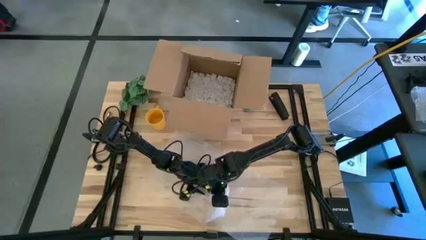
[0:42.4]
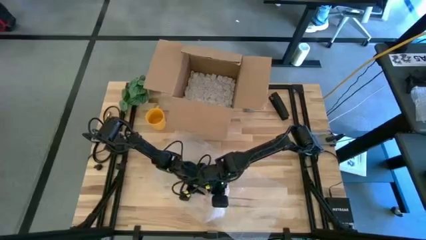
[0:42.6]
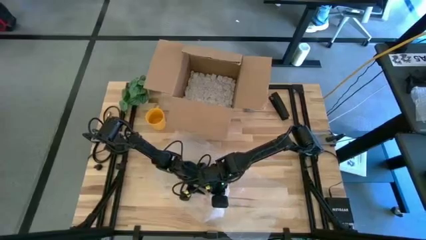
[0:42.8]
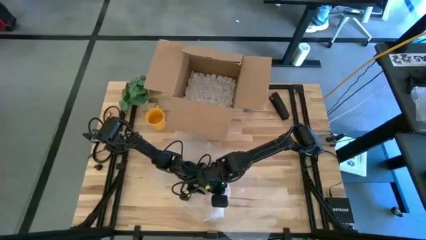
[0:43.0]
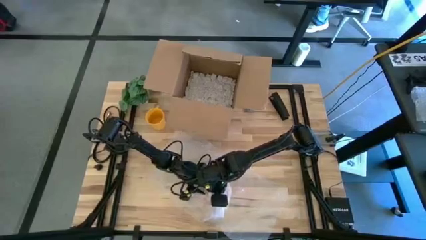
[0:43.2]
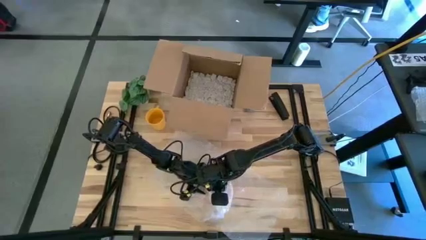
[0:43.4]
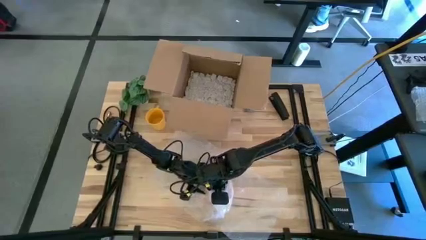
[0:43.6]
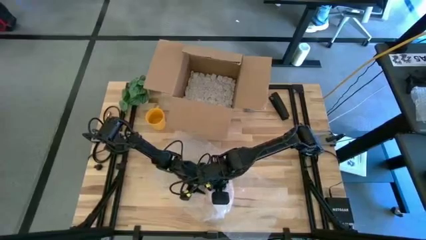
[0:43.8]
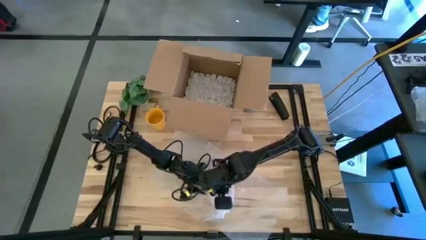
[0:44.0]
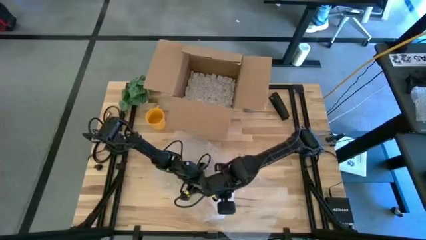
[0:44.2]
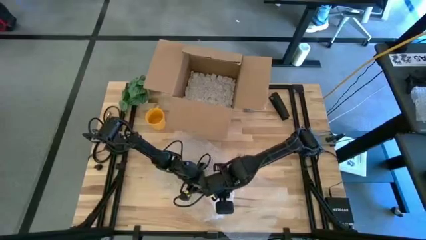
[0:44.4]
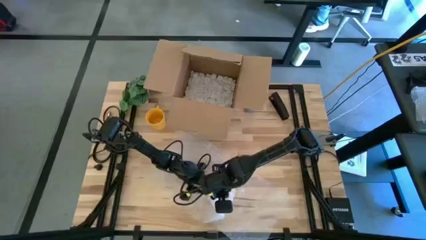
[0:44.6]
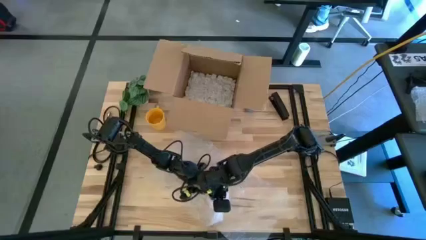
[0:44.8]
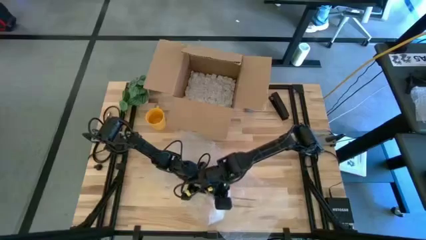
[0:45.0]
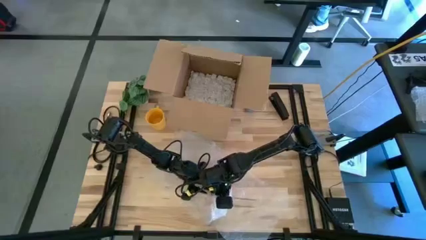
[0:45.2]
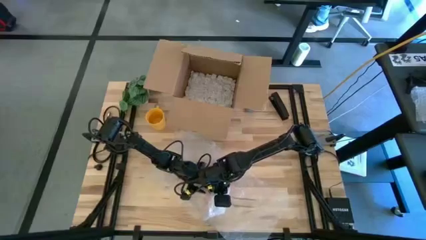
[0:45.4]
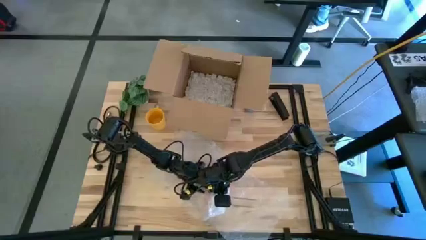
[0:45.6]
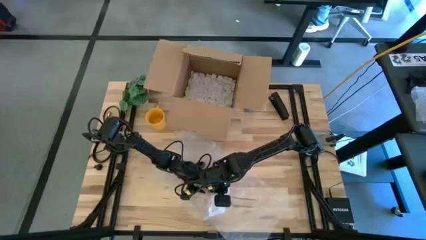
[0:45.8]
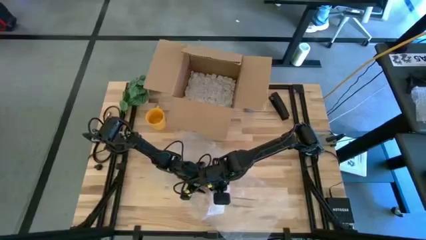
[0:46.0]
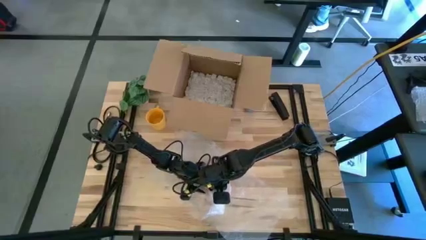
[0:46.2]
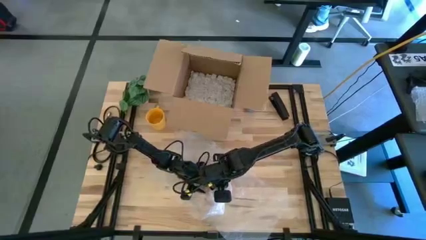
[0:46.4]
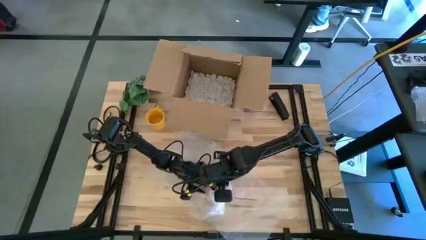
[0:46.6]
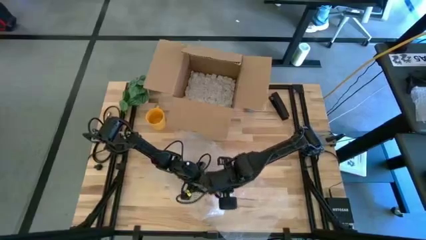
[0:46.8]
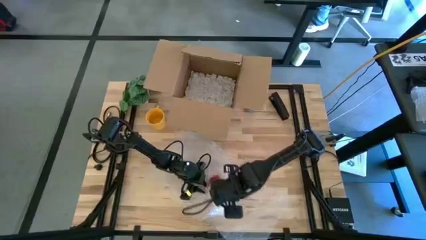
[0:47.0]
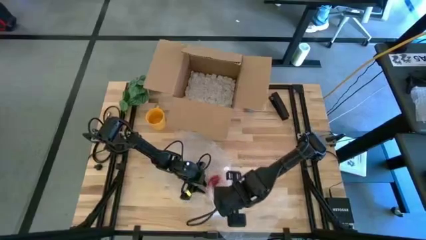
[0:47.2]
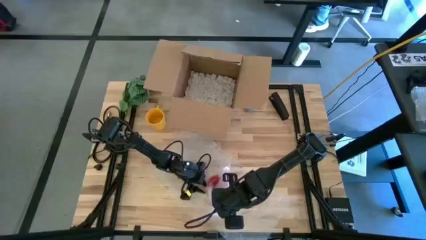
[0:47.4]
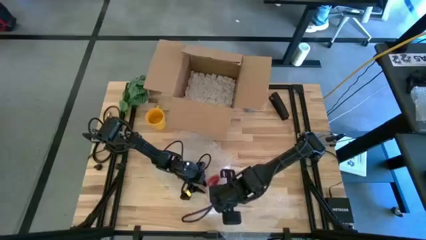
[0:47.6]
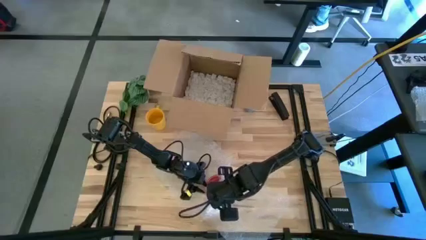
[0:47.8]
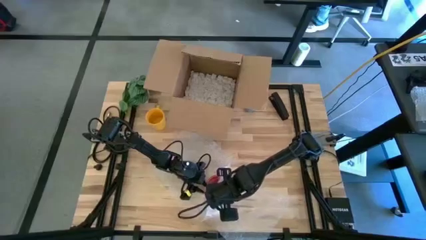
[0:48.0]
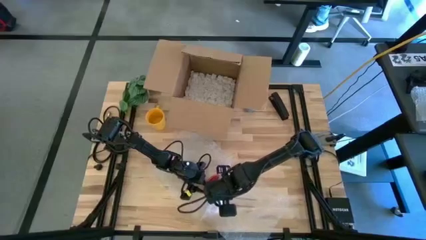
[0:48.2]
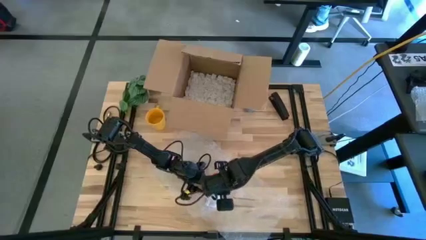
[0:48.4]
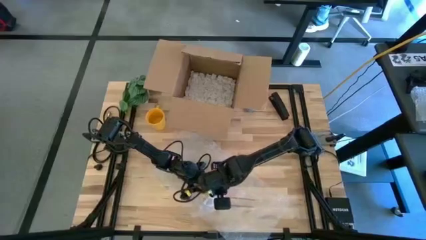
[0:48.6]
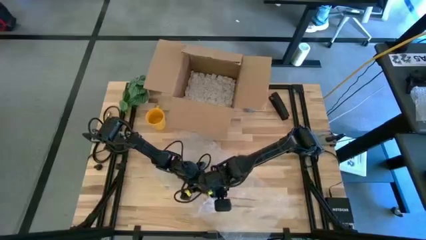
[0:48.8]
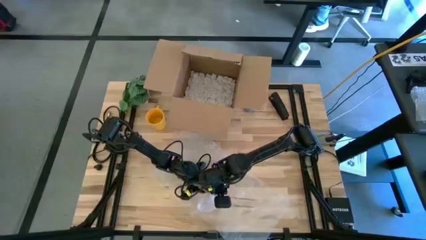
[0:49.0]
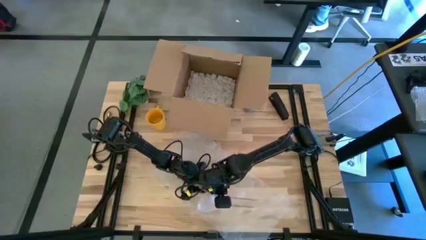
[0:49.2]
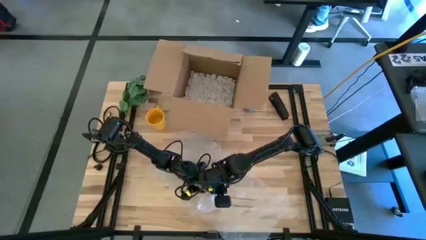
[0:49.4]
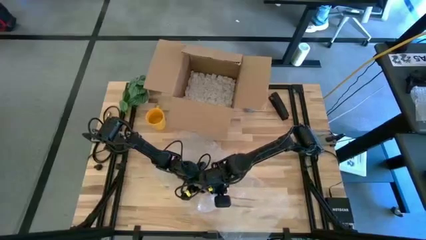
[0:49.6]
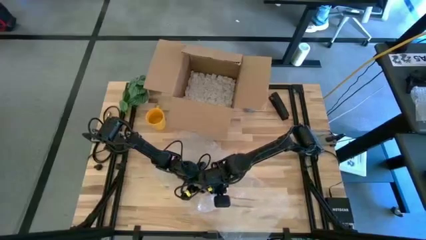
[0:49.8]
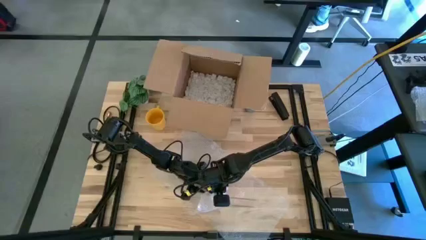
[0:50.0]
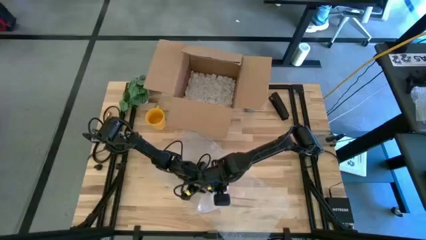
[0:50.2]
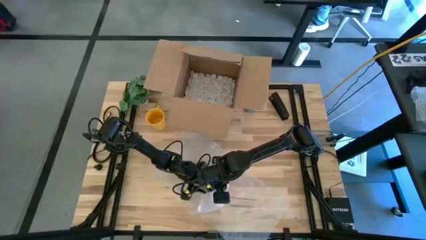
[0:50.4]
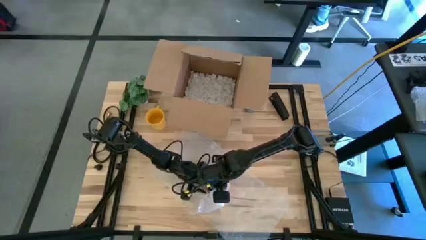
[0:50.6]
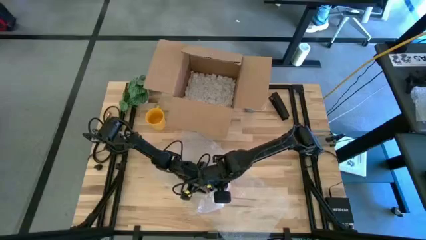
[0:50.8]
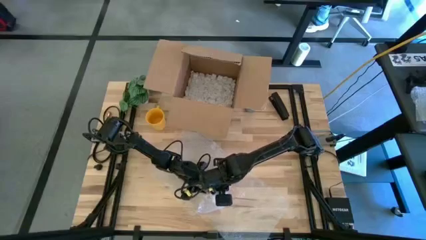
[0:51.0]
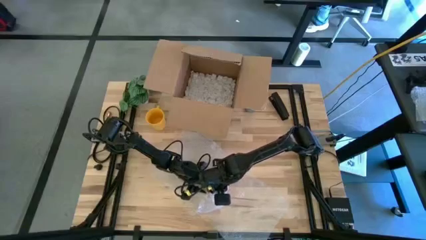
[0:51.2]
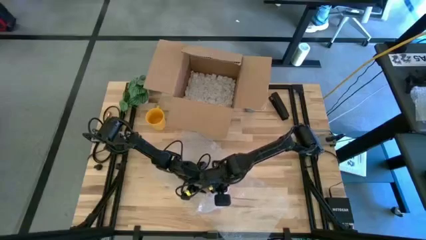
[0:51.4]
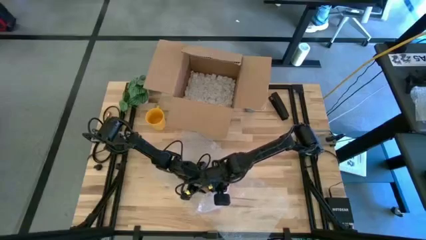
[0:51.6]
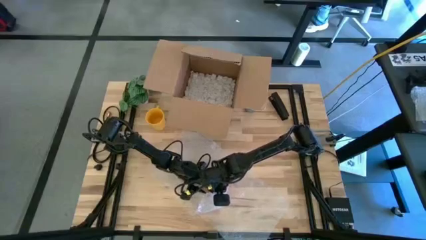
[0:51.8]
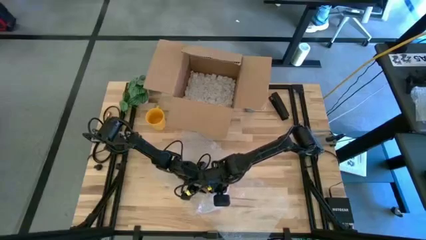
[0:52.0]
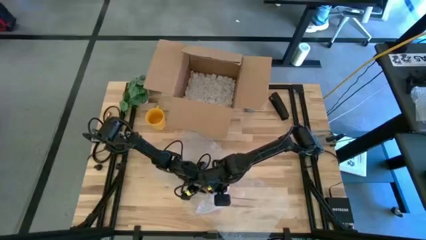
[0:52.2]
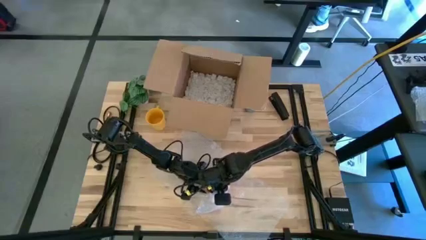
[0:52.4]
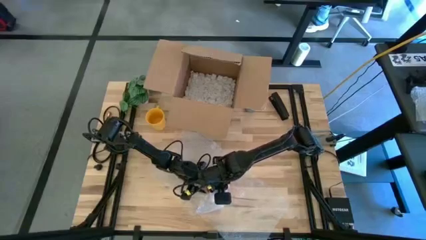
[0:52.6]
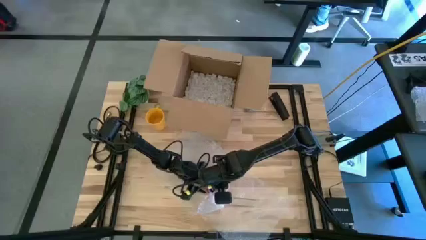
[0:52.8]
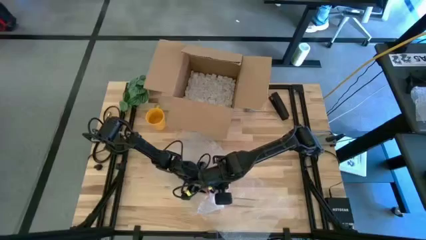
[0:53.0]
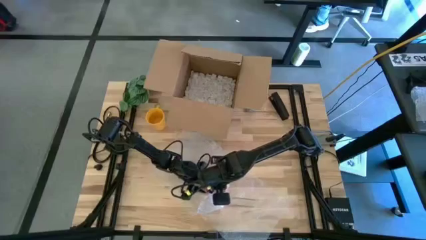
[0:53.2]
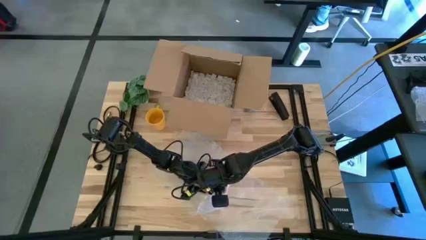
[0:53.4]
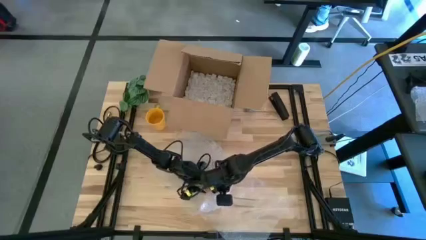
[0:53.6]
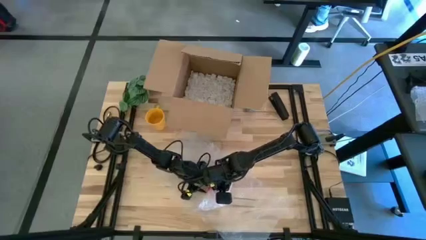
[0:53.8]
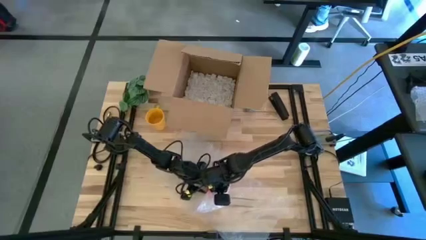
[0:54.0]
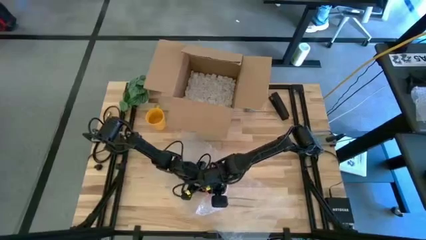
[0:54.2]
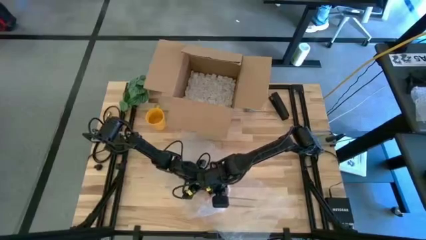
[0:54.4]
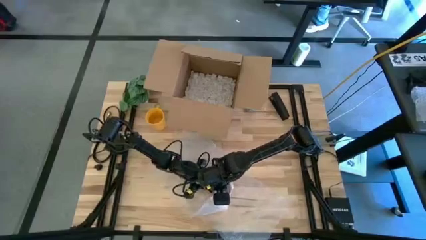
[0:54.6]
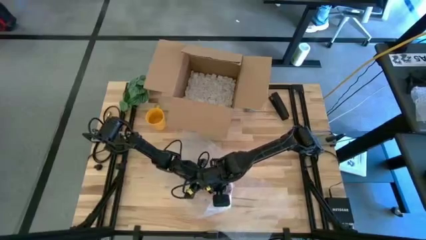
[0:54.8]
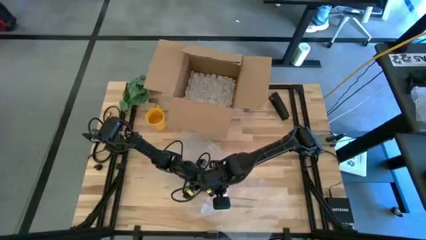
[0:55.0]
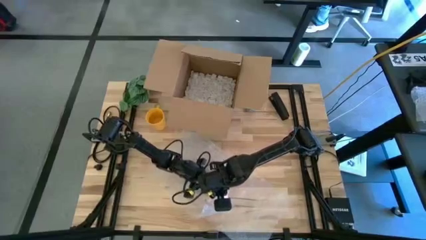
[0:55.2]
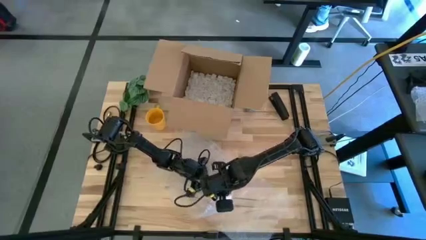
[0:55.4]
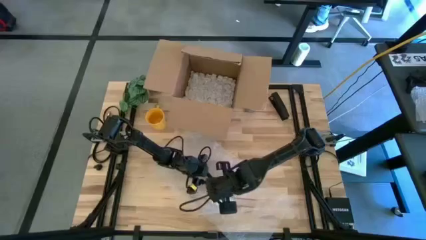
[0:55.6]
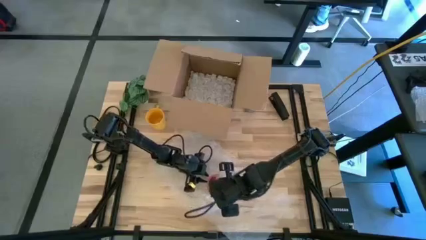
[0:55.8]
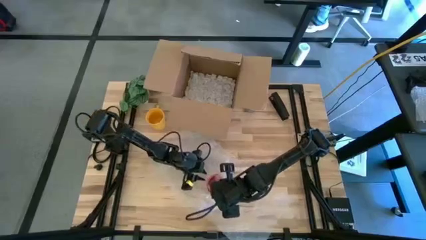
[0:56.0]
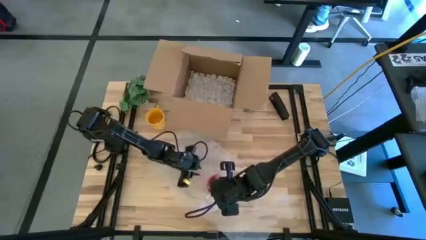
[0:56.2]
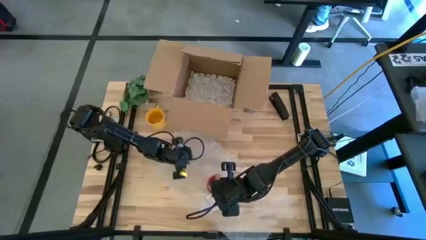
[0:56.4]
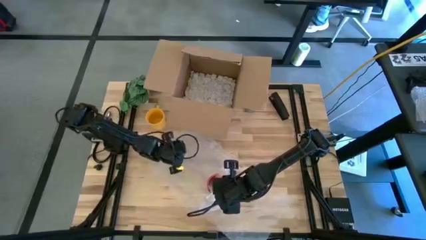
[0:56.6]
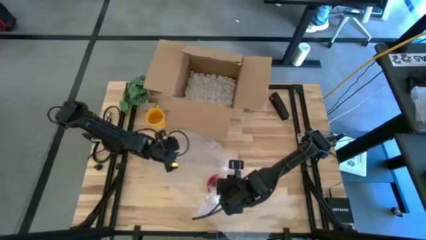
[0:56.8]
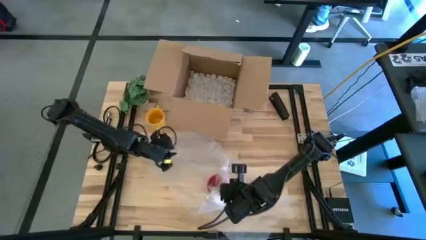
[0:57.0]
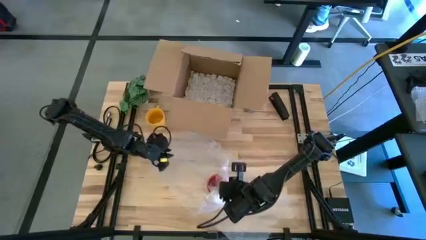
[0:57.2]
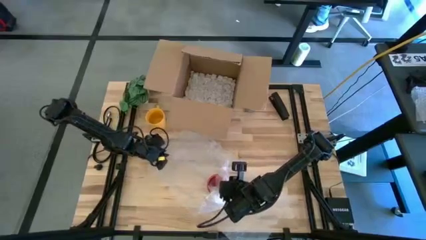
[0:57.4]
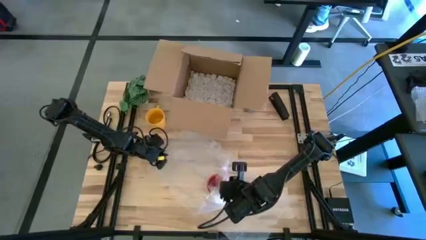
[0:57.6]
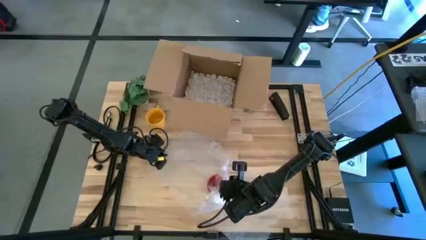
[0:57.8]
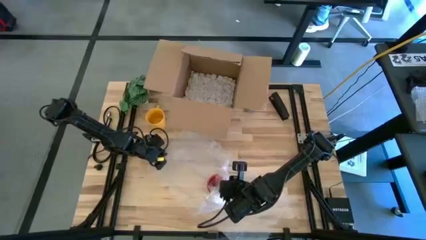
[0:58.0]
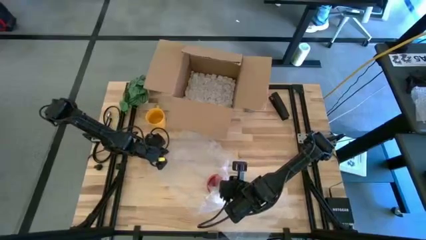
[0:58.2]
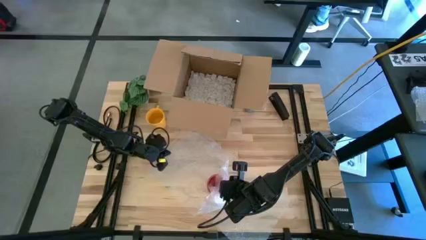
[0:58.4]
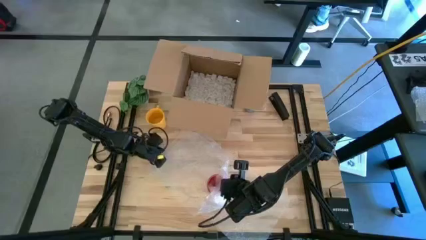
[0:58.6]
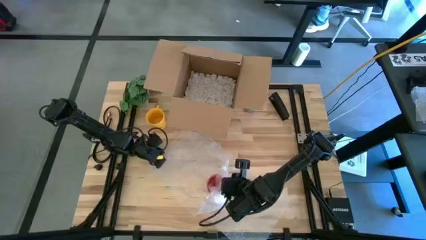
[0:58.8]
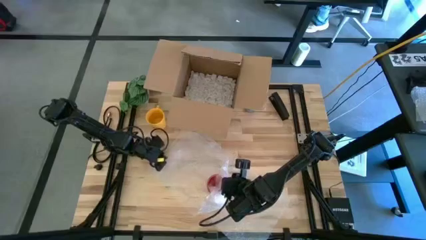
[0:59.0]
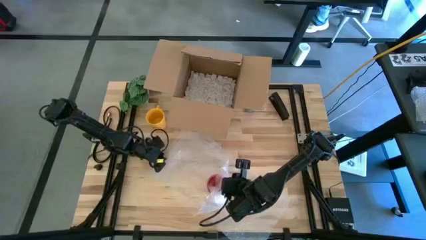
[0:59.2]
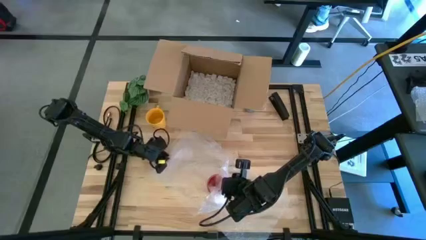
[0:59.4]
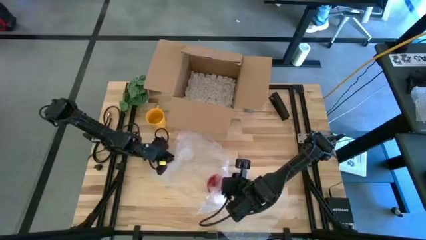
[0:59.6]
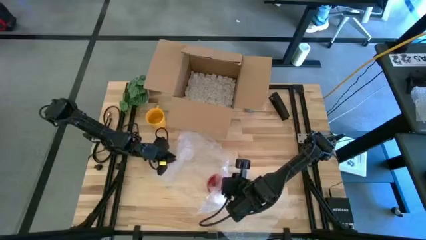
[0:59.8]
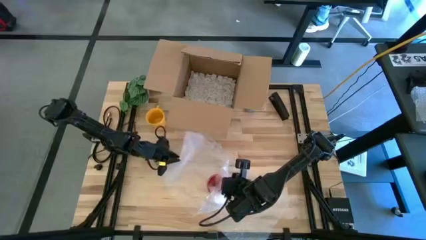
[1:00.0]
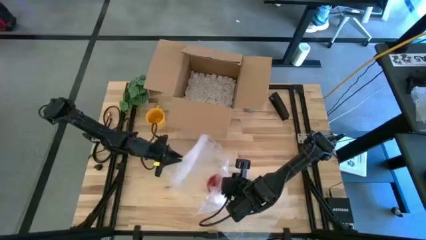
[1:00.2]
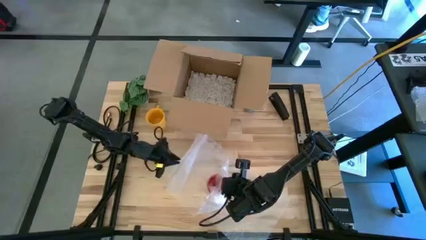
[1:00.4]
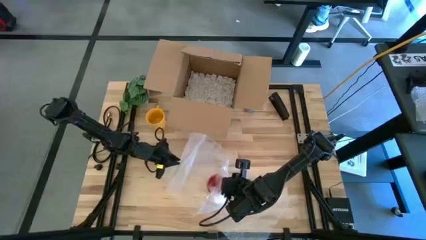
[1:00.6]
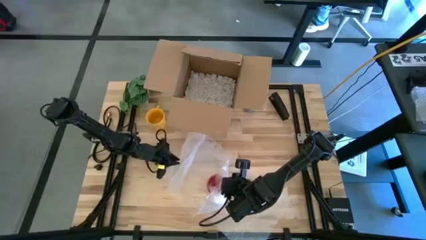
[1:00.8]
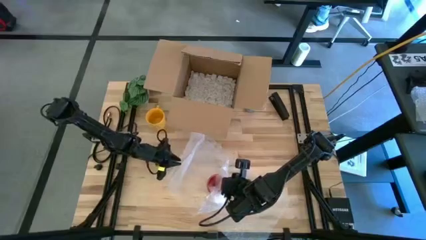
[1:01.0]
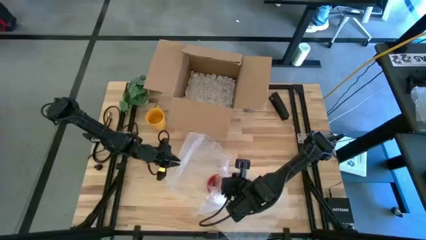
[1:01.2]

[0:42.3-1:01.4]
Task: wrap mug
Wrap the red mug with the bubble wrap
